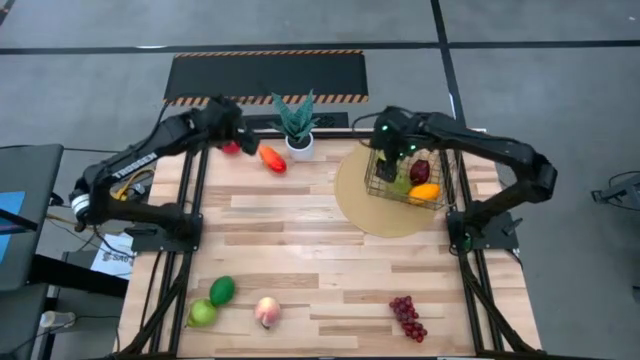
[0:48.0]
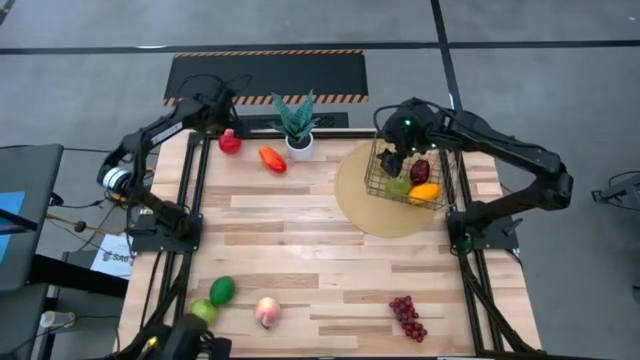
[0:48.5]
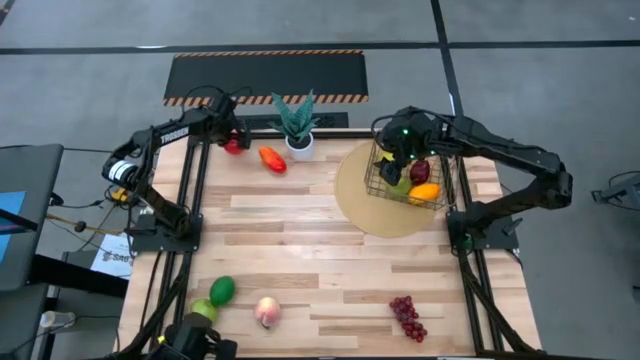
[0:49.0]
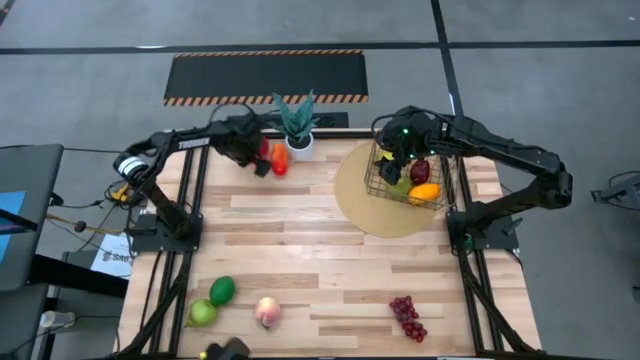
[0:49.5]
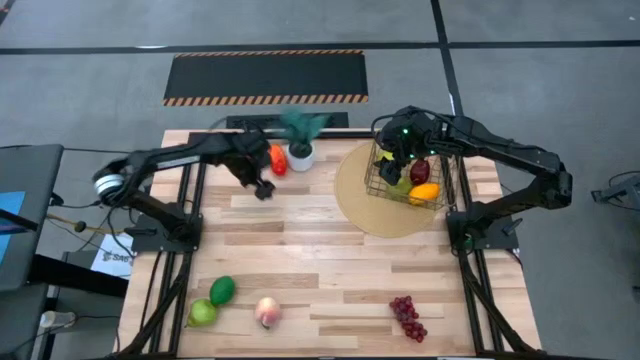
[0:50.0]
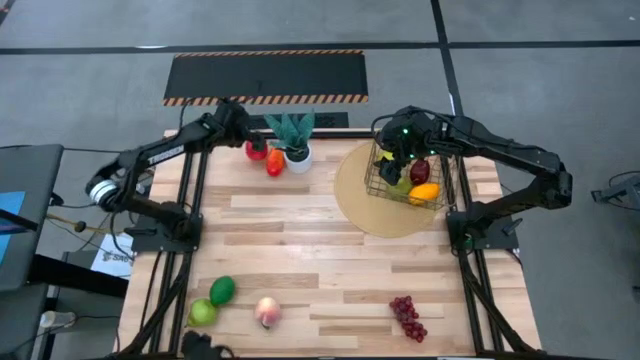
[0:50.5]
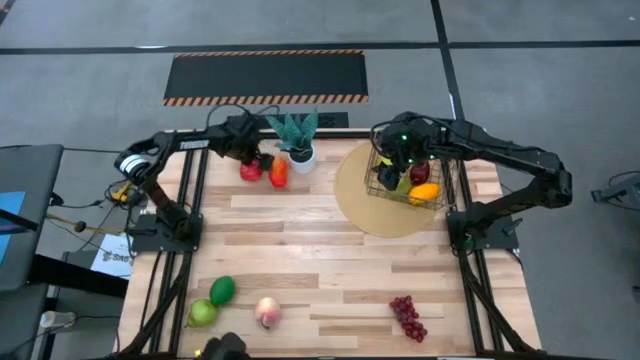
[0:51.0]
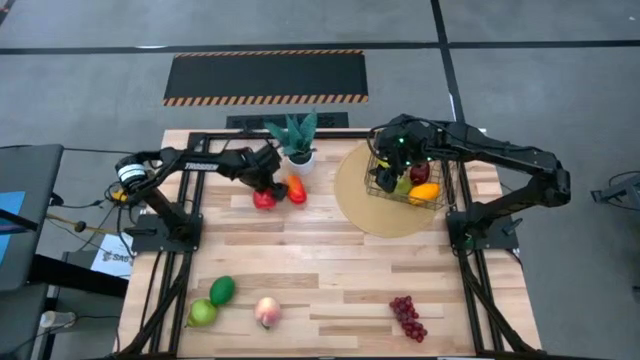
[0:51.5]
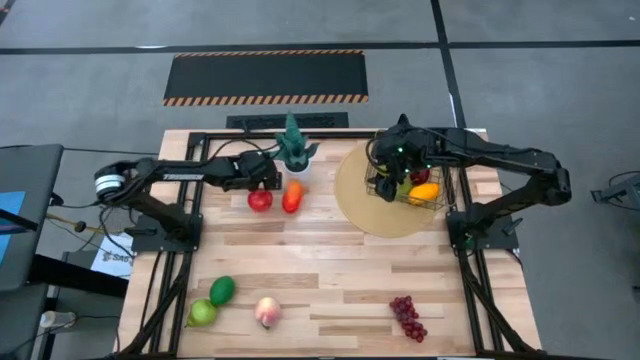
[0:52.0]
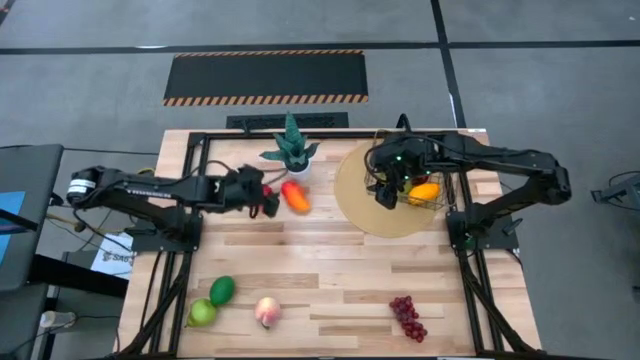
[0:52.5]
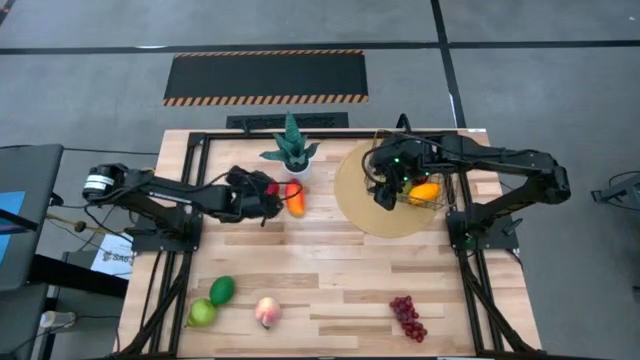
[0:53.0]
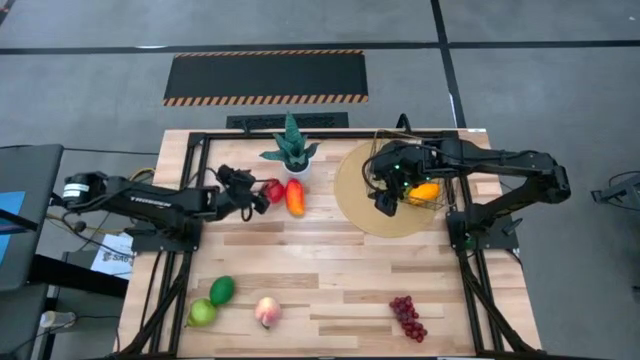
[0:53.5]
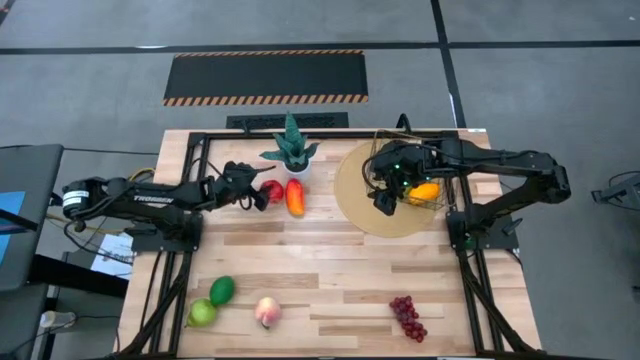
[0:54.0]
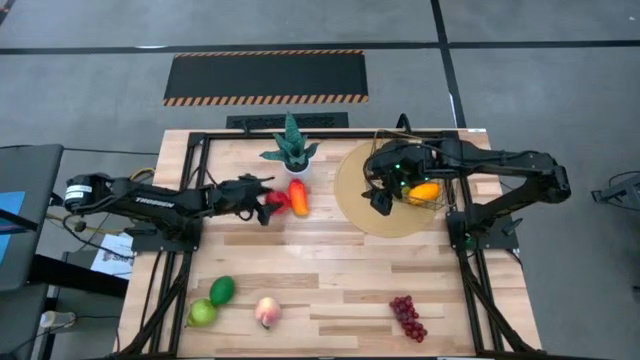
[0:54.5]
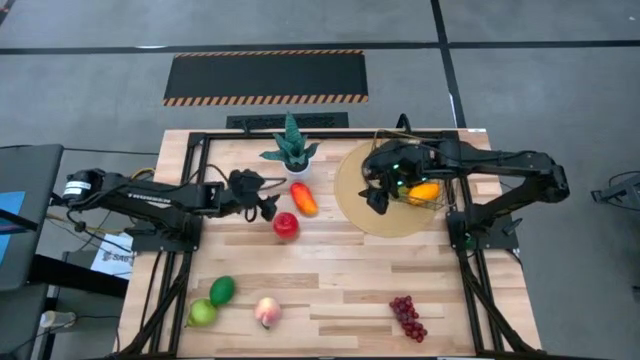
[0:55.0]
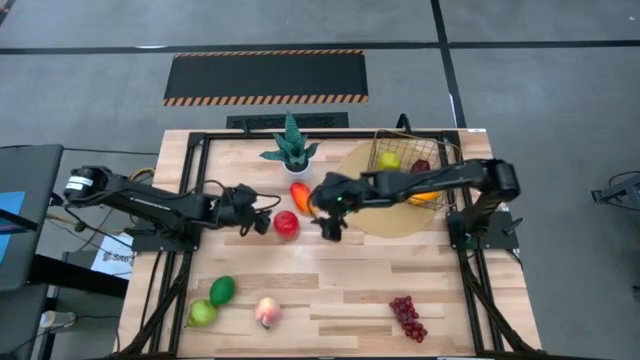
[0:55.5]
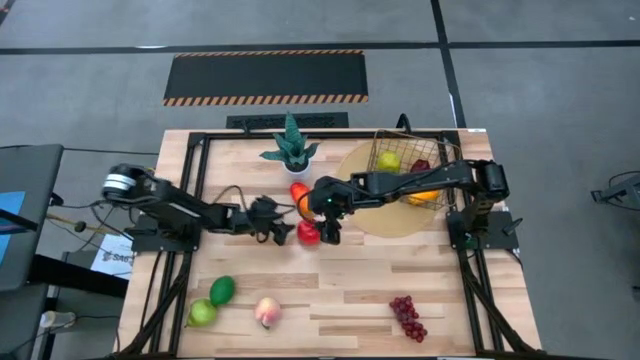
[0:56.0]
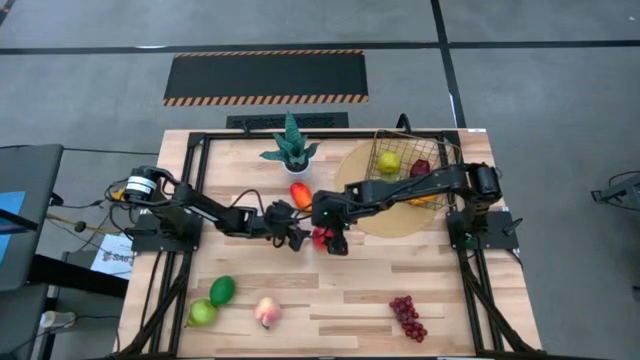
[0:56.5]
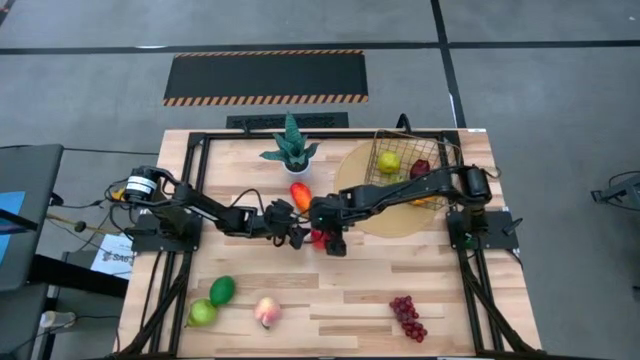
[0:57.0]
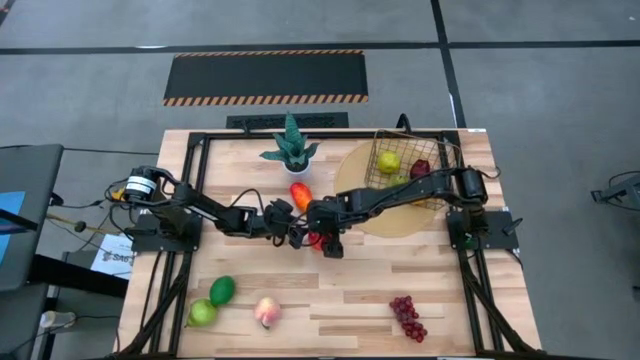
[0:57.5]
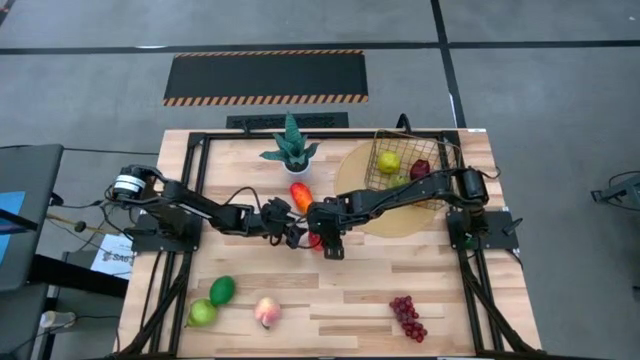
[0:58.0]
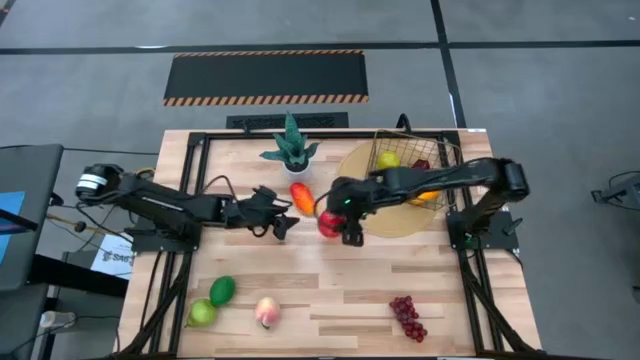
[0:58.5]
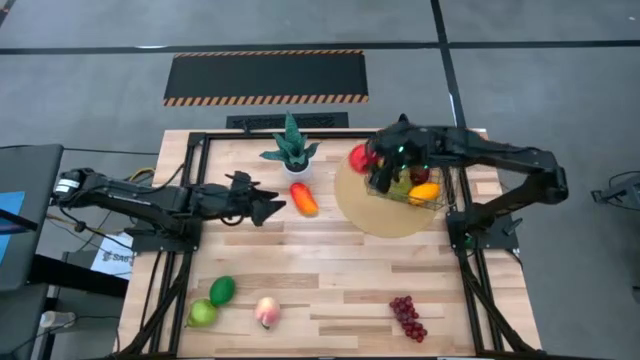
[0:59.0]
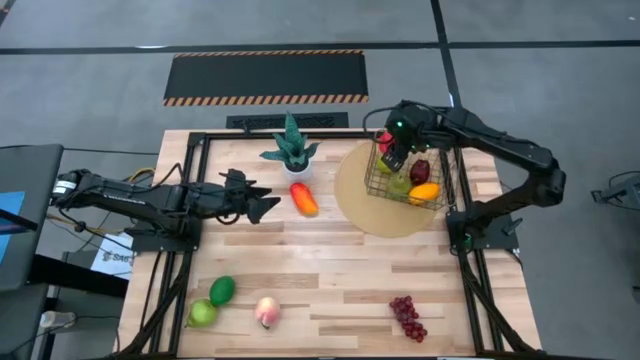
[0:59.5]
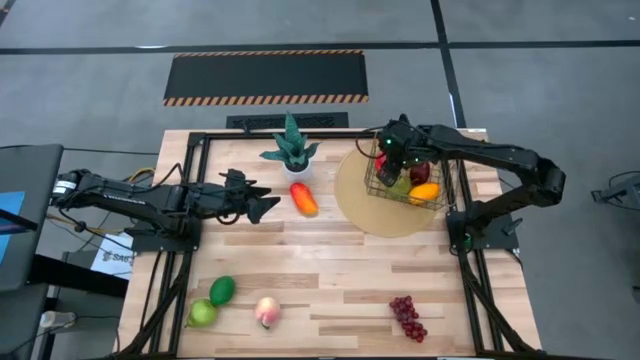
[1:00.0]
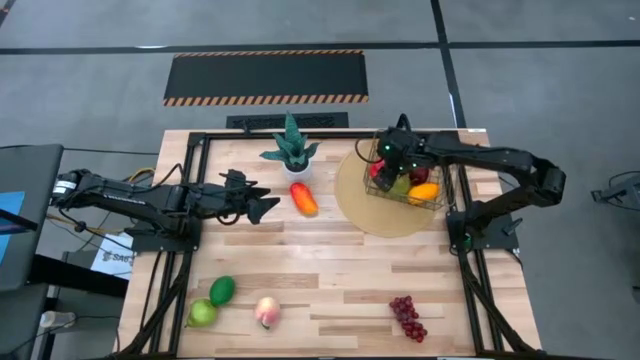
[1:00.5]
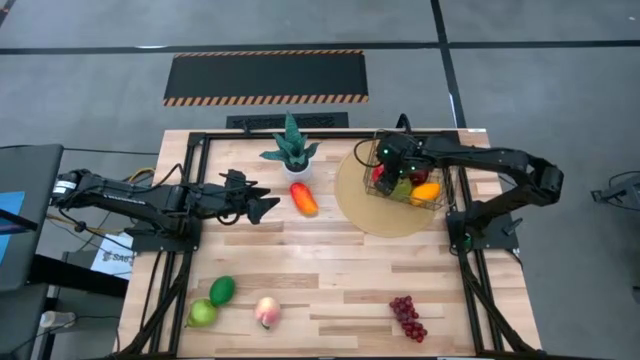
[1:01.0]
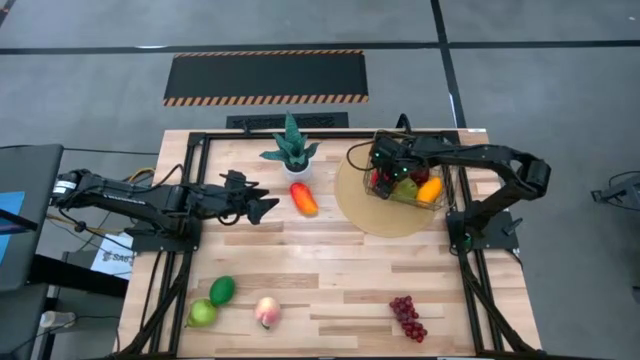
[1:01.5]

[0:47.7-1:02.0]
Task: Build produce basket
Put the red apple into the basket

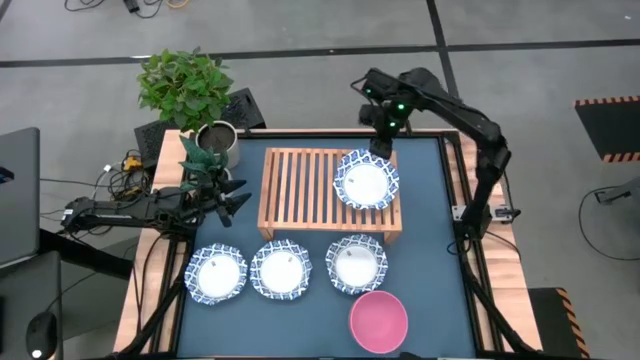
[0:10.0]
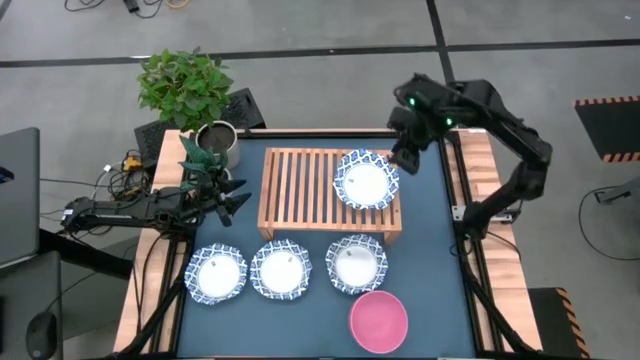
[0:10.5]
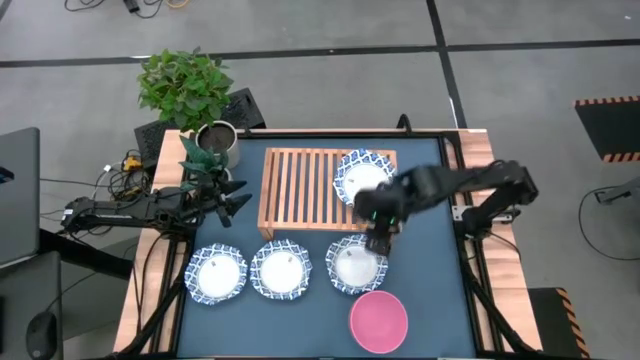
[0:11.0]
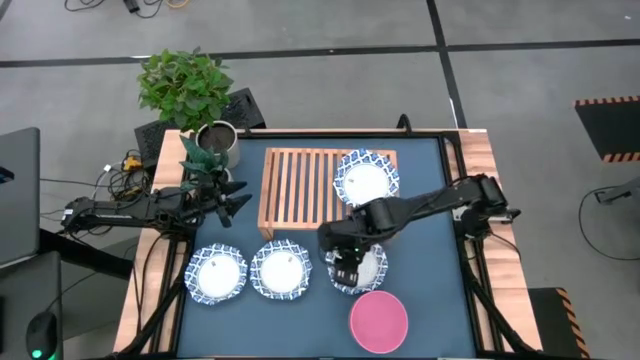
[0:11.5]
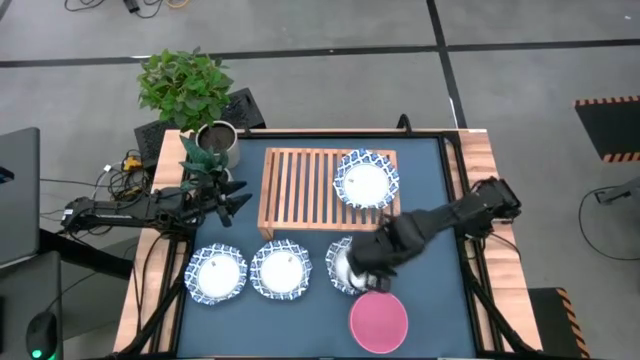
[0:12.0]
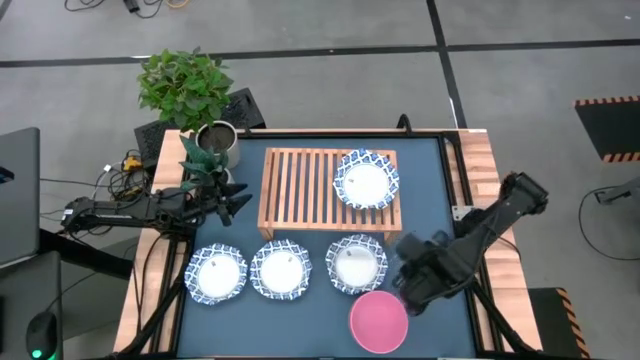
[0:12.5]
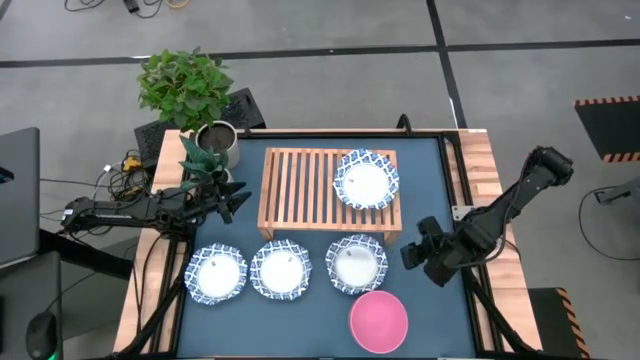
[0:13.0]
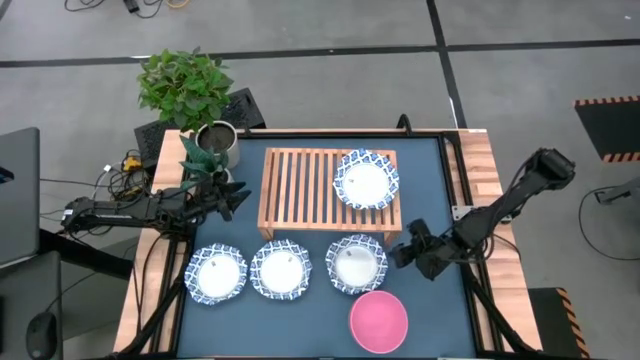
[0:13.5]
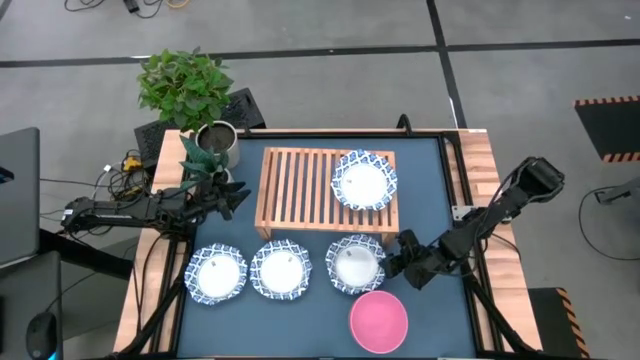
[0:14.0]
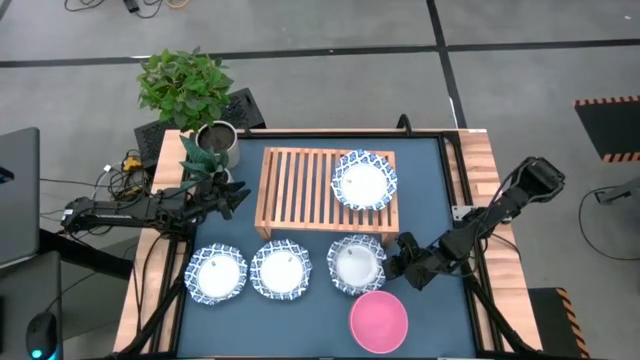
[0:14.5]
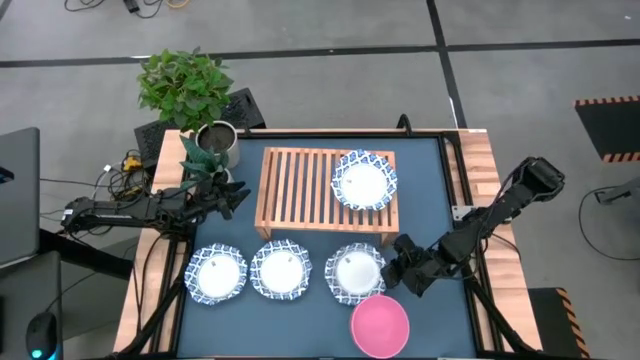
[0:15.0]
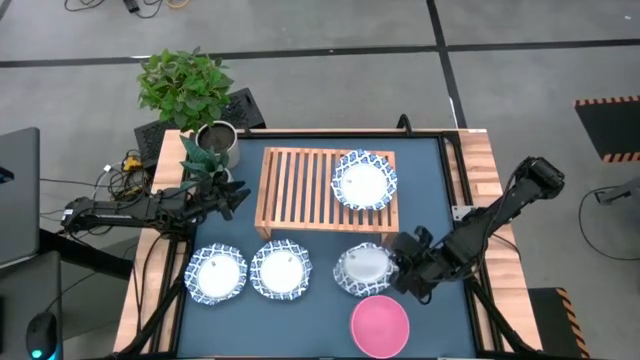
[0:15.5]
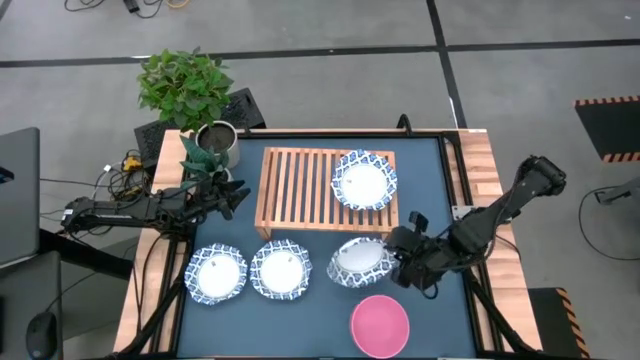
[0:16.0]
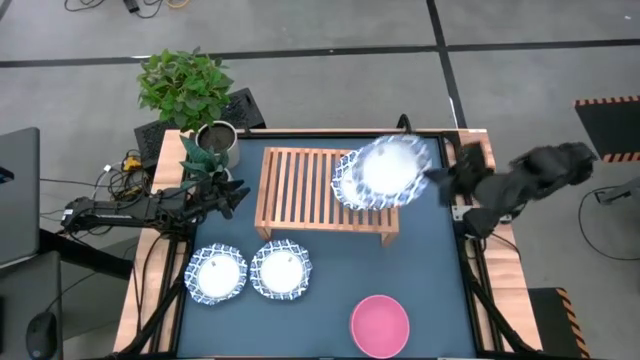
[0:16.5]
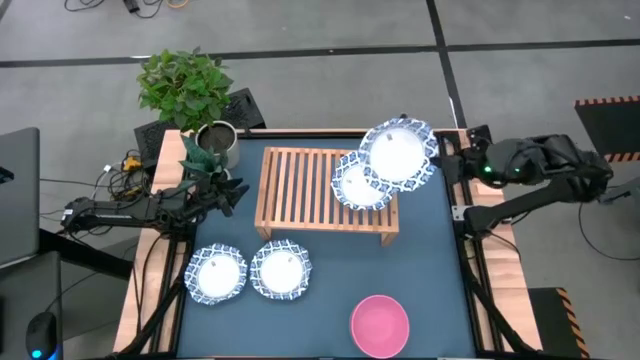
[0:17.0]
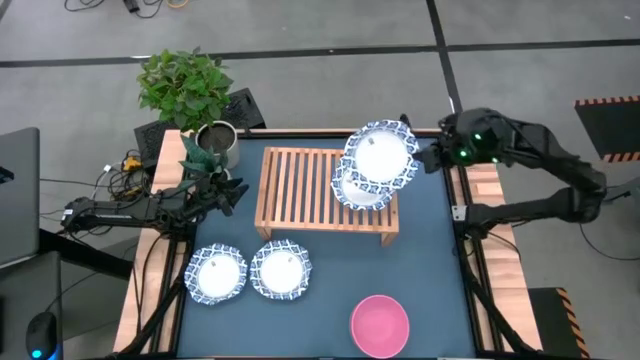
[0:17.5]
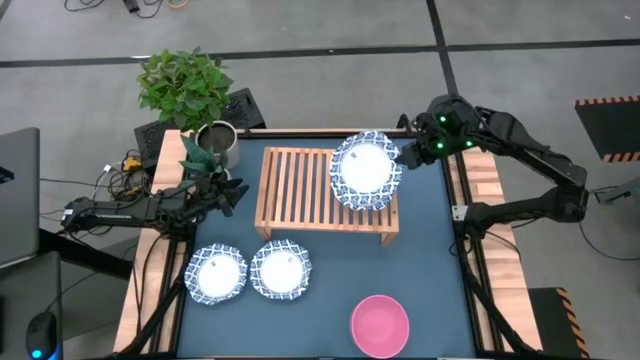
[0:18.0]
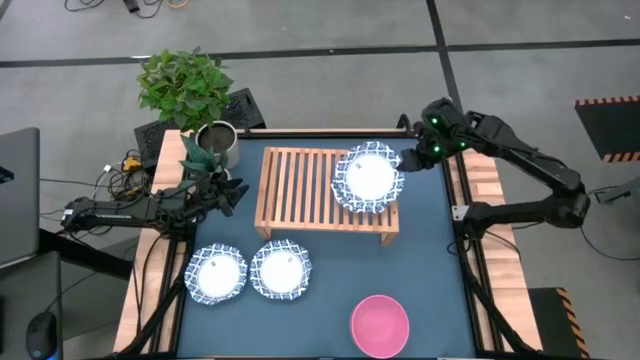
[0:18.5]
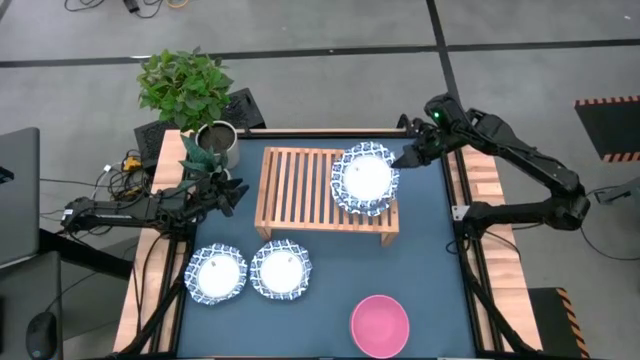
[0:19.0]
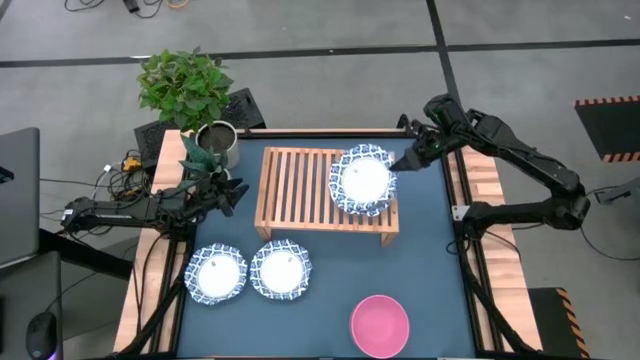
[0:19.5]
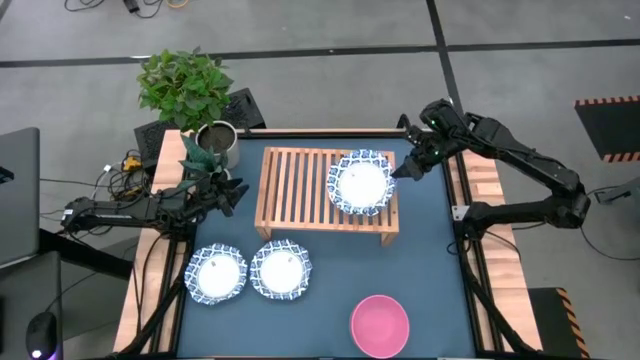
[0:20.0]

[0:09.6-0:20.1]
Task: Place and stack bowls onto a shelf
Stack the white patterned bowl on top of the white patterned bowl on the shelf
